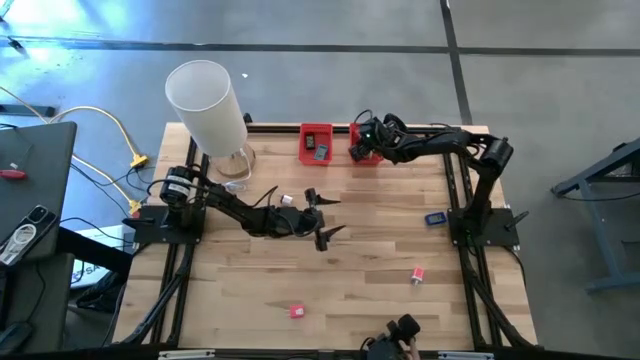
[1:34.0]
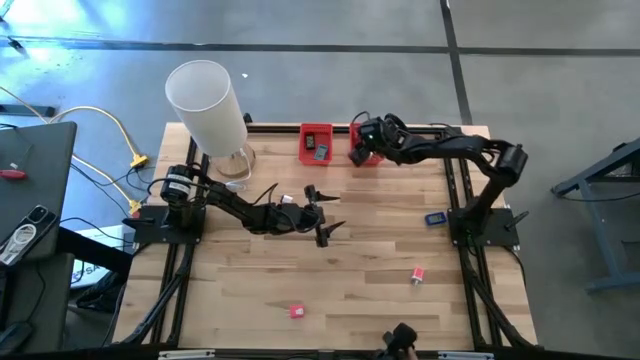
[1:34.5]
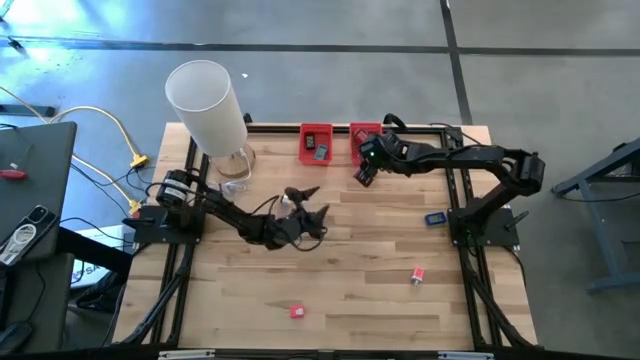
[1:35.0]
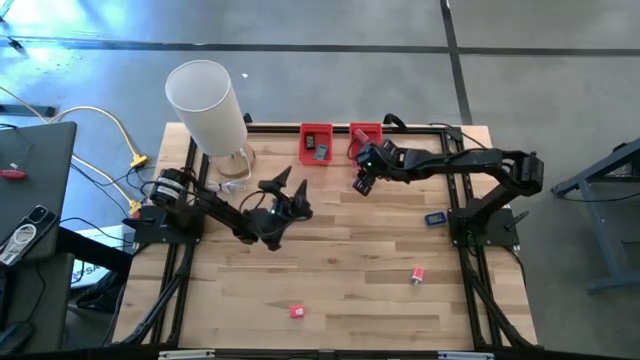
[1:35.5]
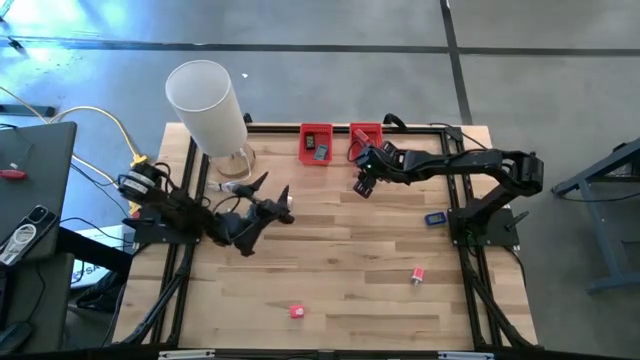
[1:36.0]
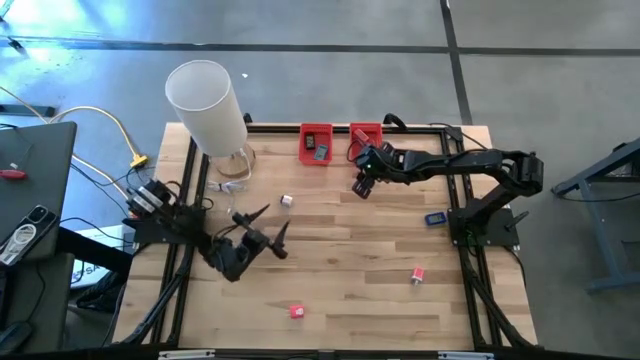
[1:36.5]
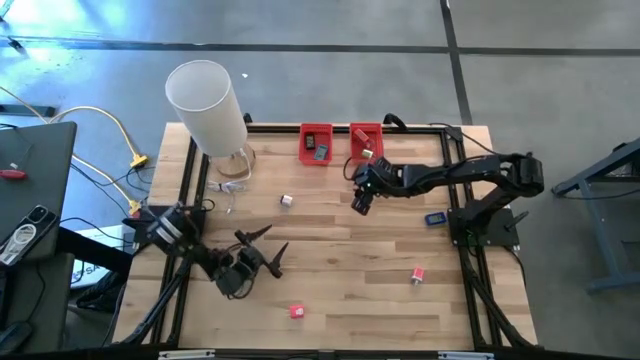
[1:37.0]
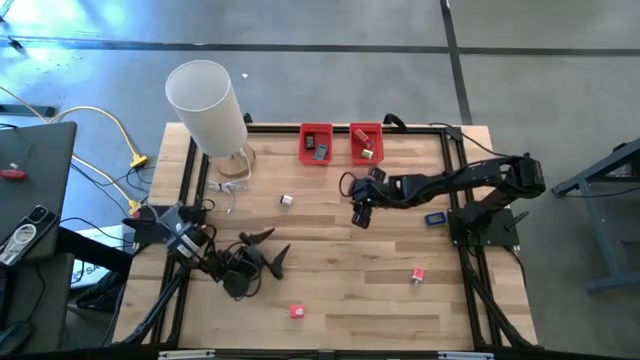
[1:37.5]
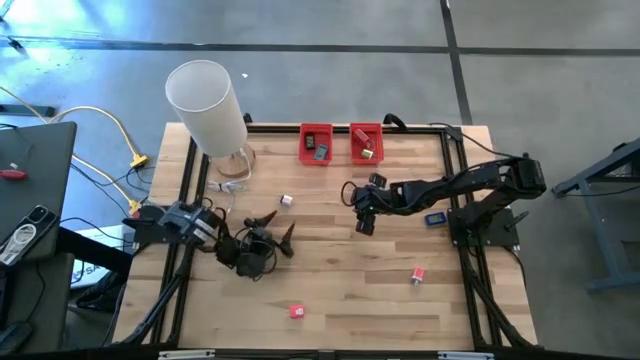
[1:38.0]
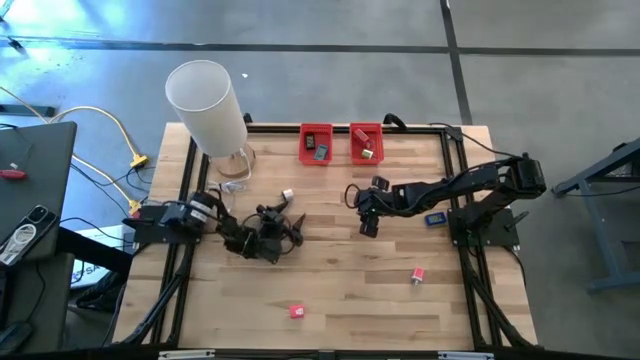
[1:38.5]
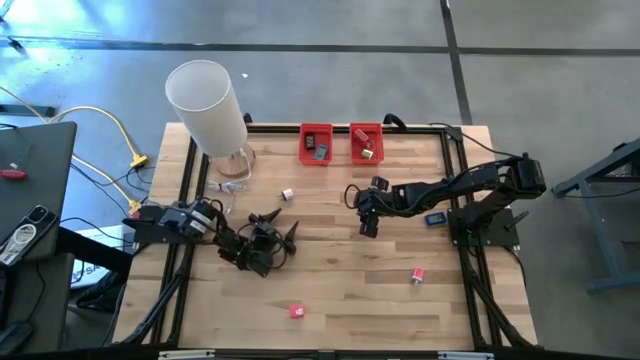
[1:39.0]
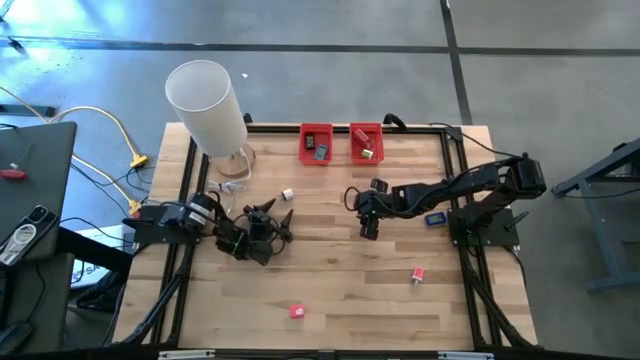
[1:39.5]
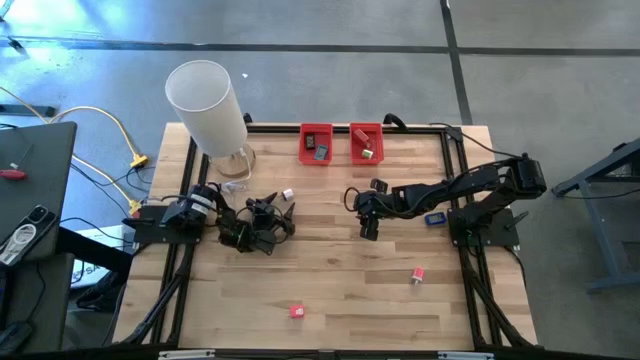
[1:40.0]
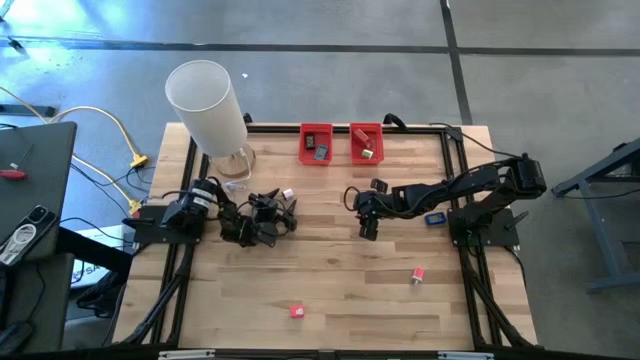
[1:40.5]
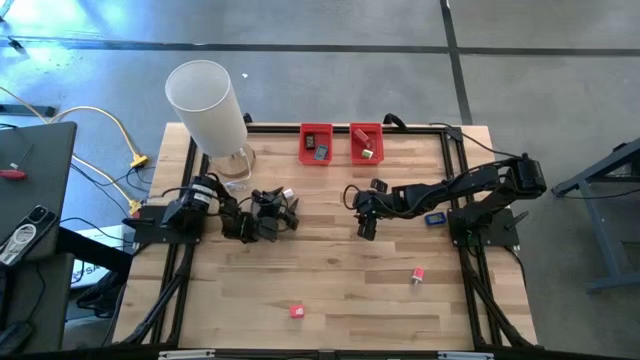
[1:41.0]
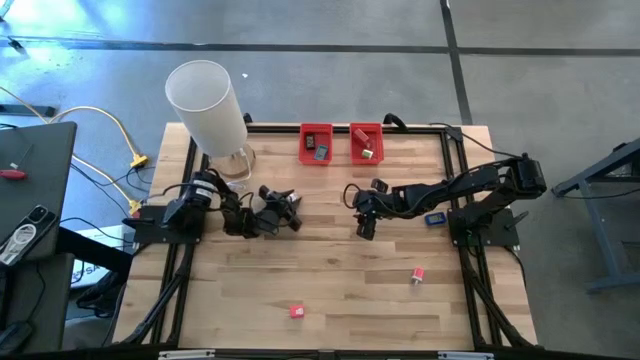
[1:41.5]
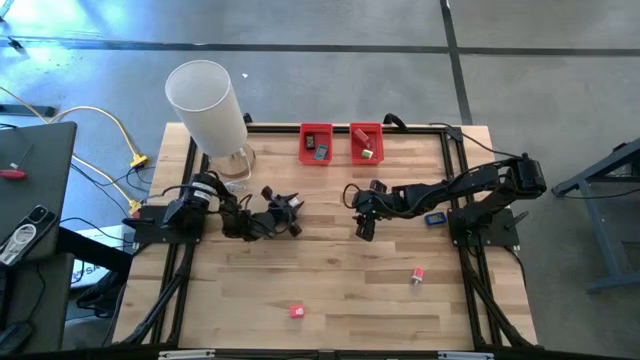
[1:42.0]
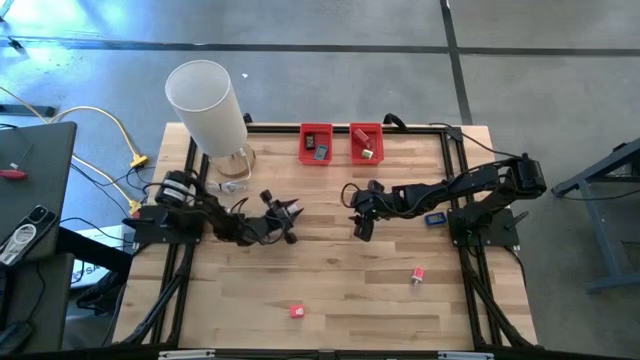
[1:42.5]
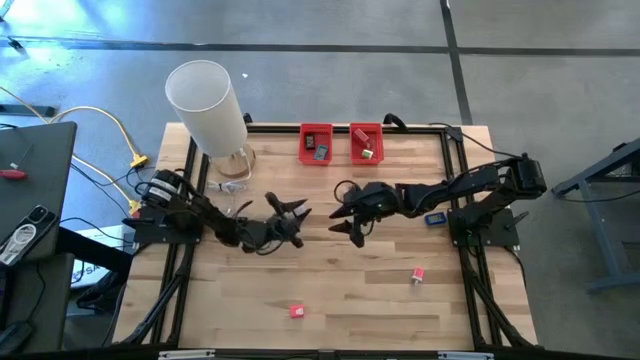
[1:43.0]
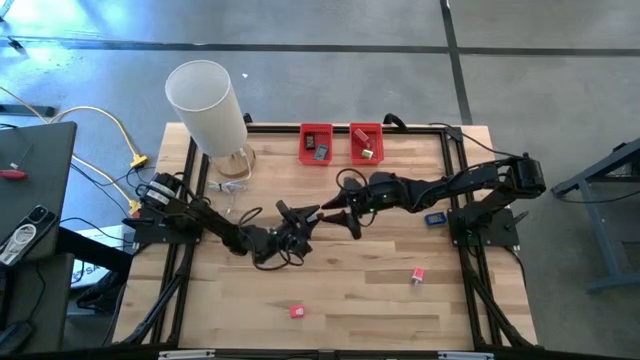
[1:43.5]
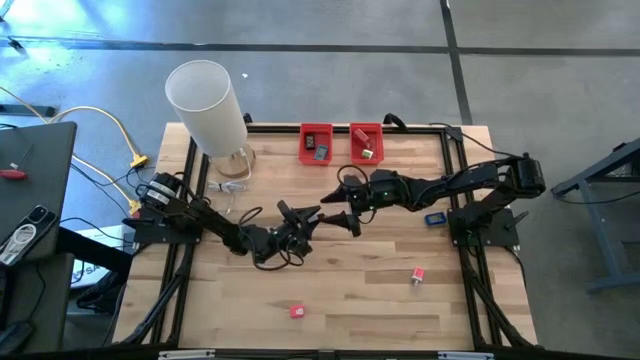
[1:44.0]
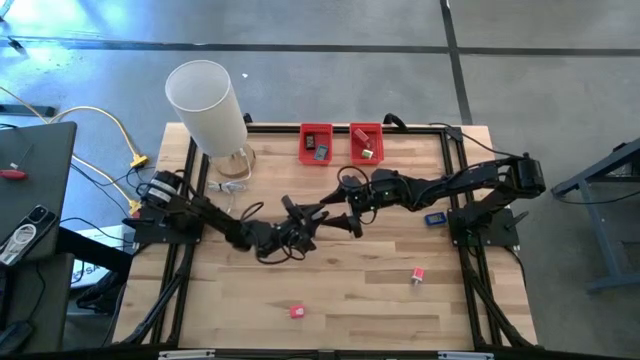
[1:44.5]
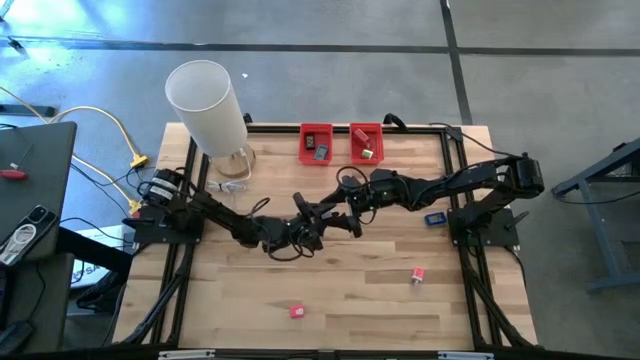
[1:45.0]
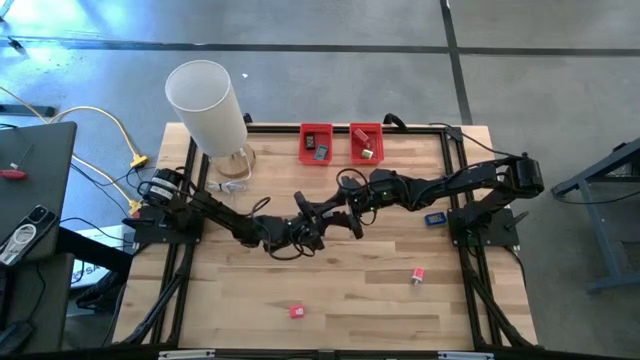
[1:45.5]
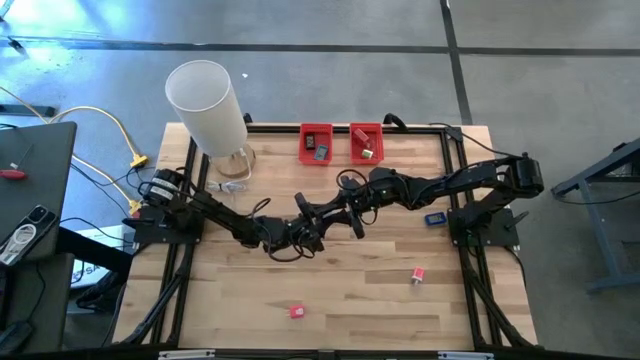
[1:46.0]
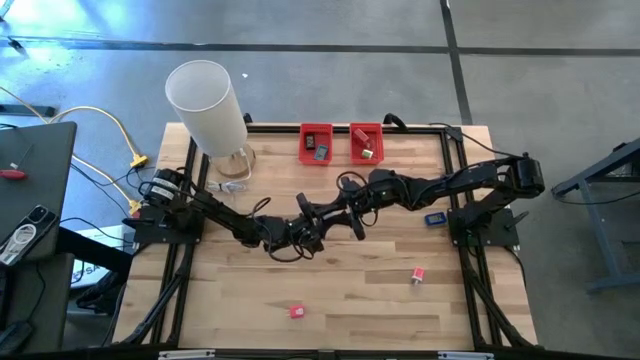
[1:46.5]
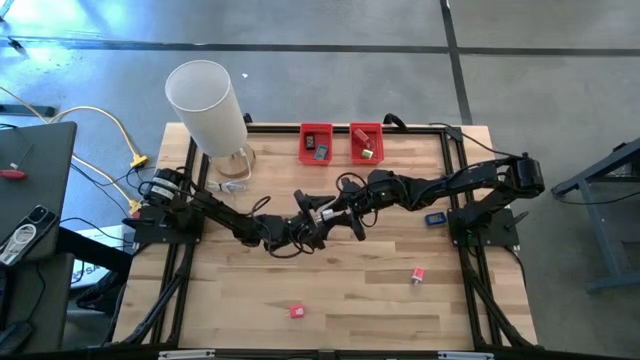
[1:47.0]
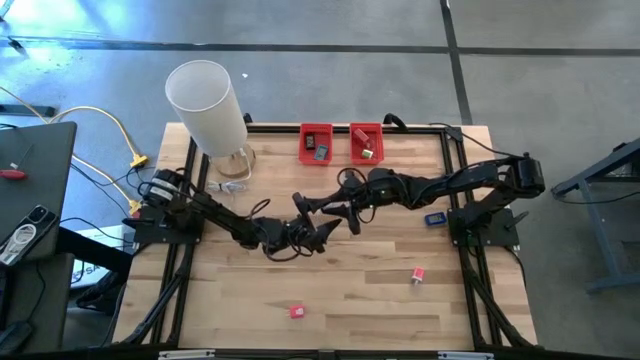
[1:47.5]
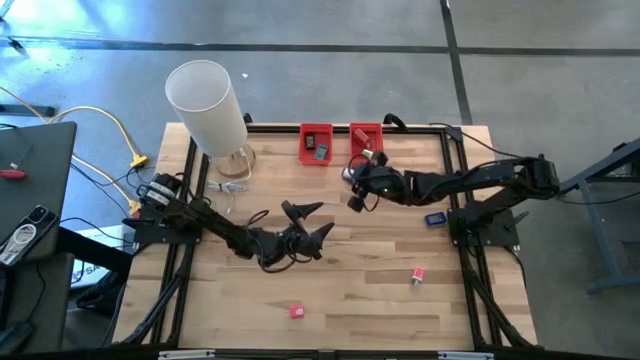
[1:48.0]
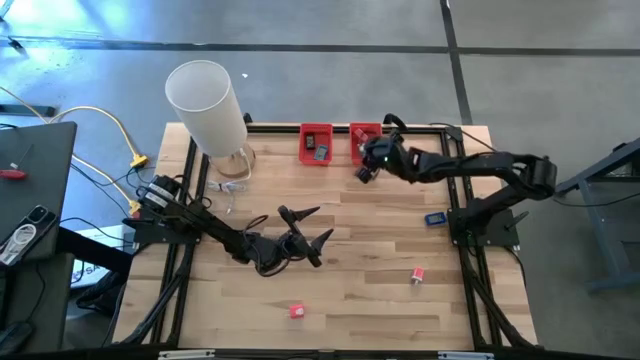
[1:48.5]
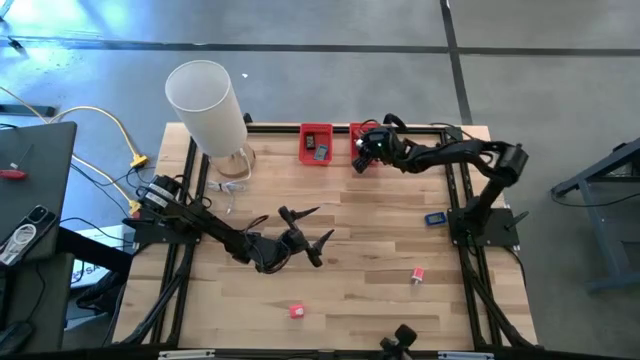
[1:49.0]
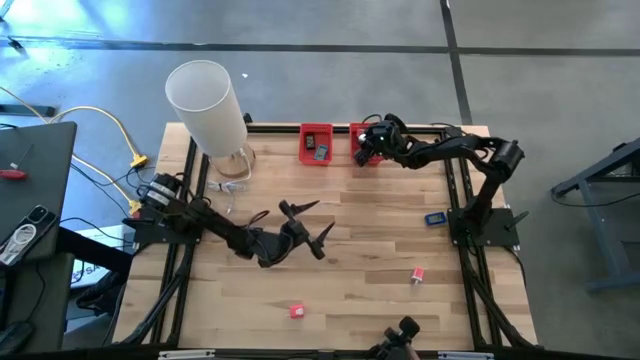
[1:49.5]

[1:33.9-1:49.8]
Task: Pick & Place Office items
Put the white charger adapter into the right red bin

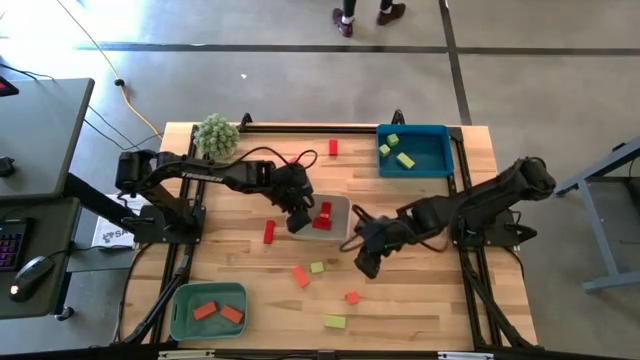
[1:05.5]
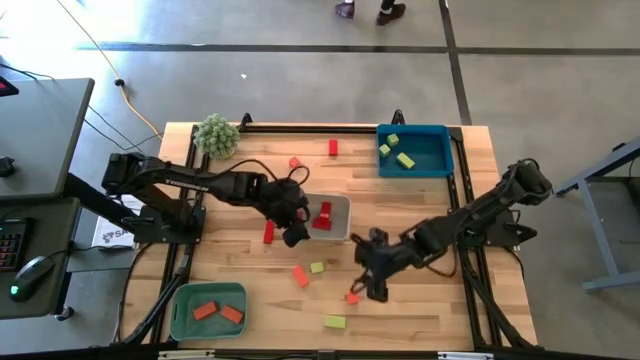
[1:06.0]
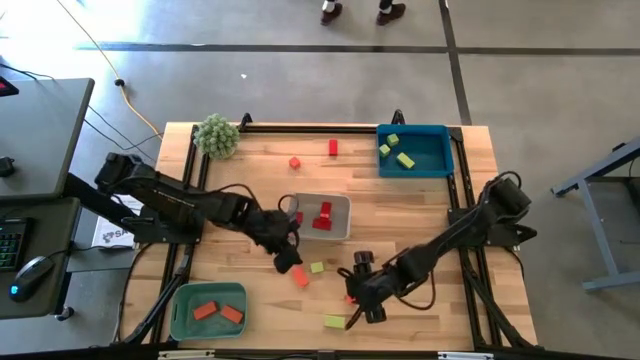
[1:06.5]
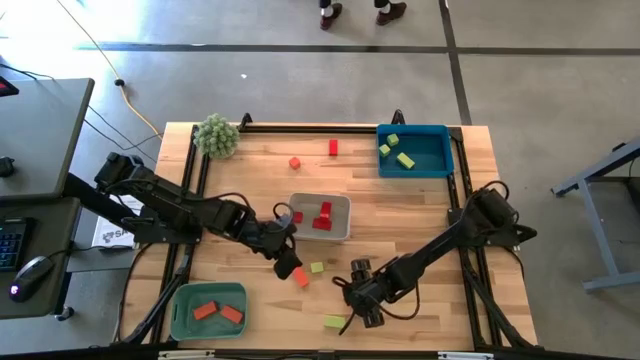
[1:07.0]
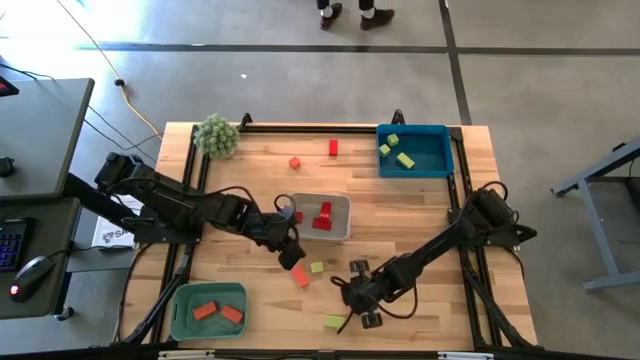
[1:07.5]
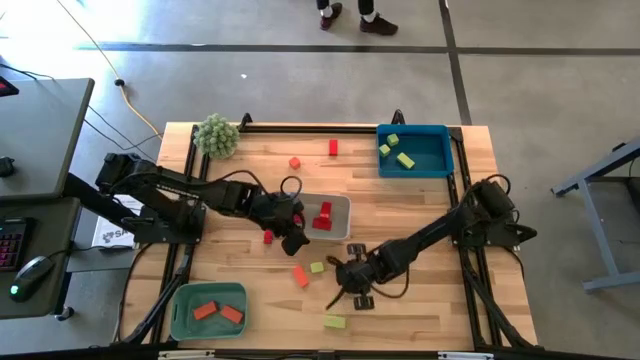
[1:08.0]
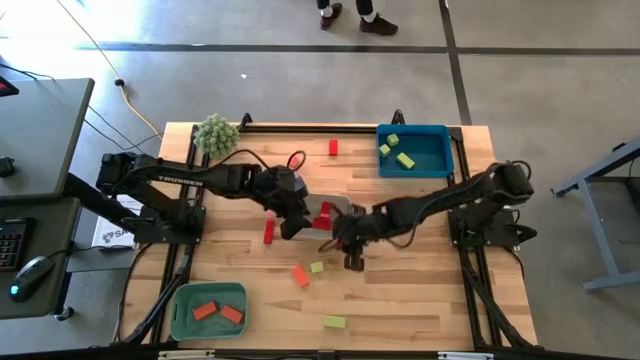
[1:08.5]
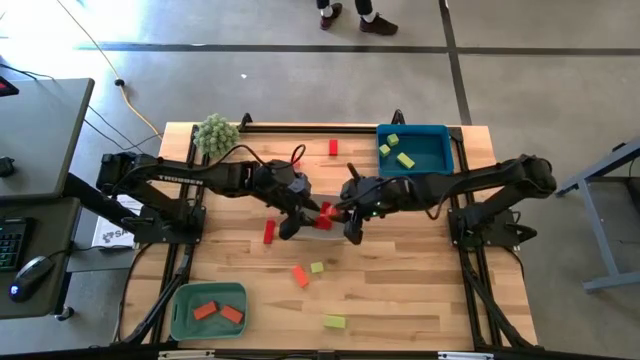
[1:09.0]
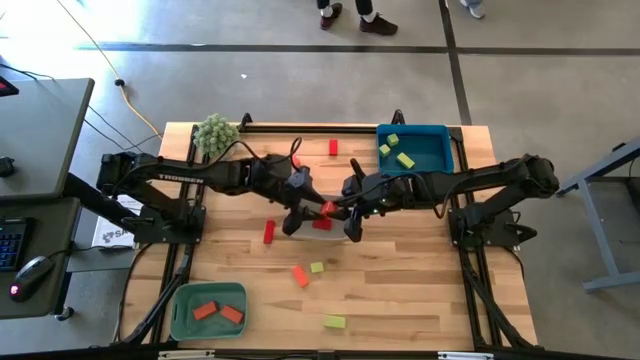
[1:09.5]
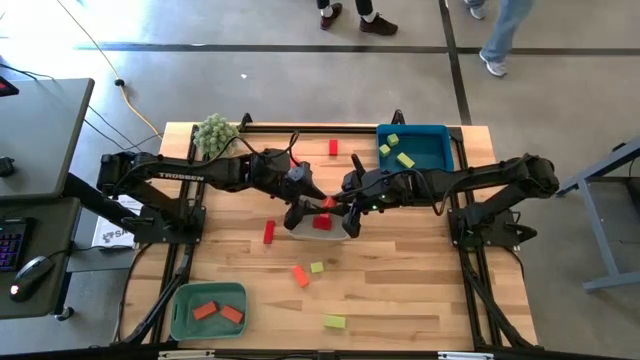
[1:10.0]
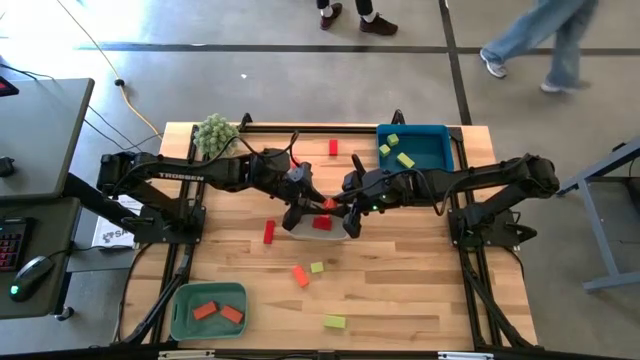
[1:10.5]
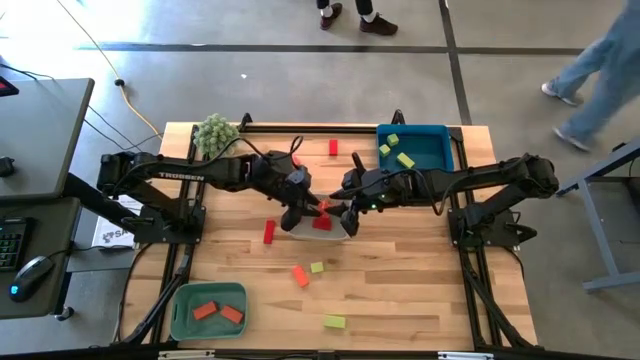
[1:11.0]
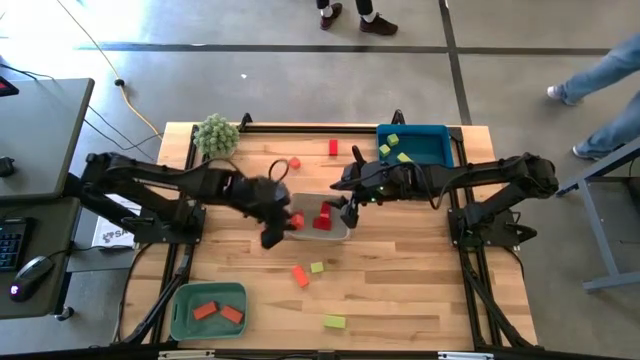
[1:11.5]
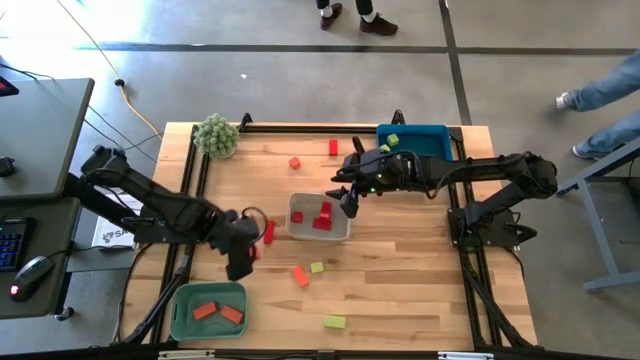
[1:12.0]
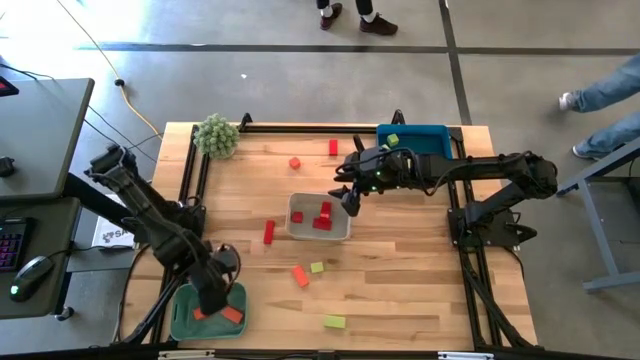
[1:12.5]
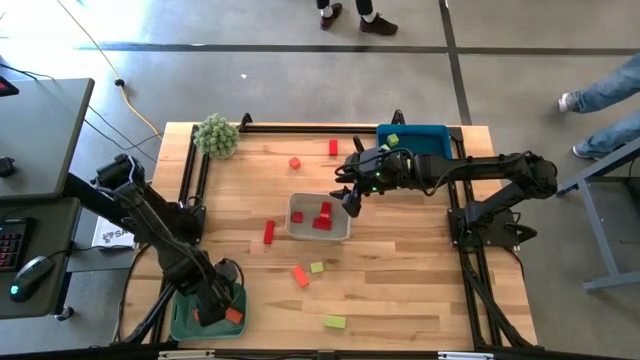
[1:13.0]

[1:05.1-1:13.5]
Task: Sort & place blocks by color
Put the orange wooden block into the green bin
